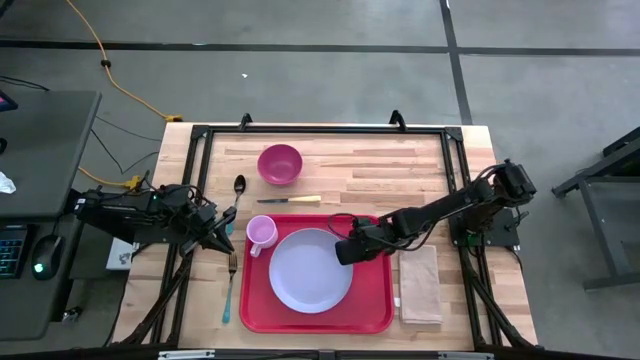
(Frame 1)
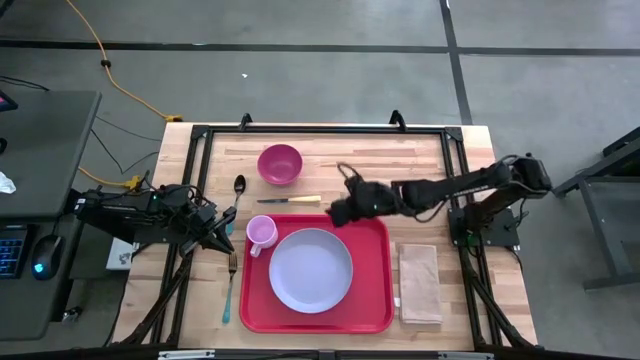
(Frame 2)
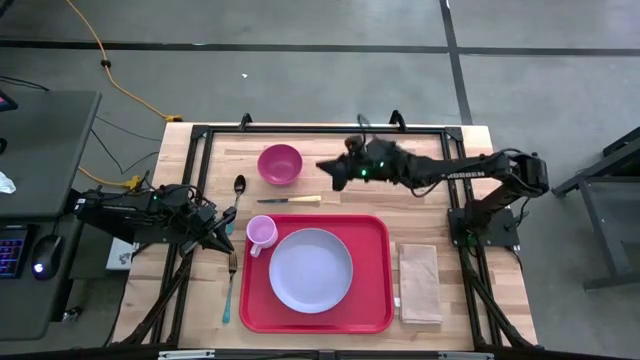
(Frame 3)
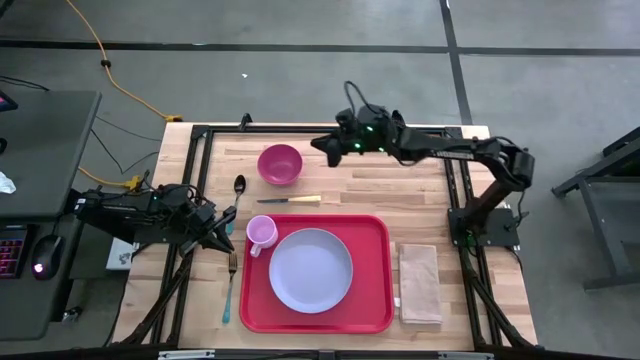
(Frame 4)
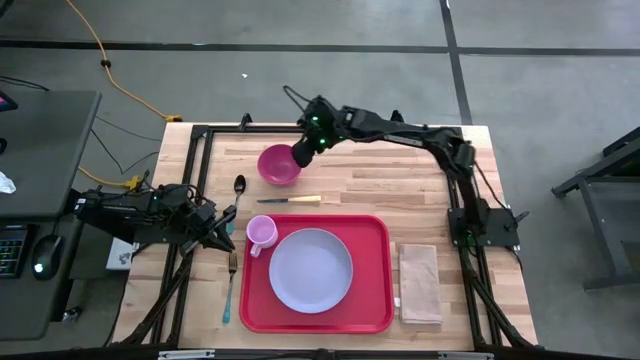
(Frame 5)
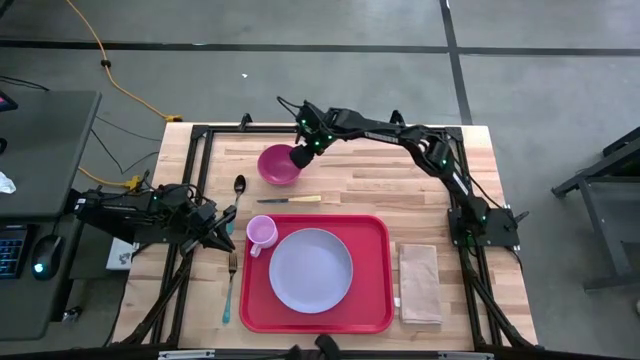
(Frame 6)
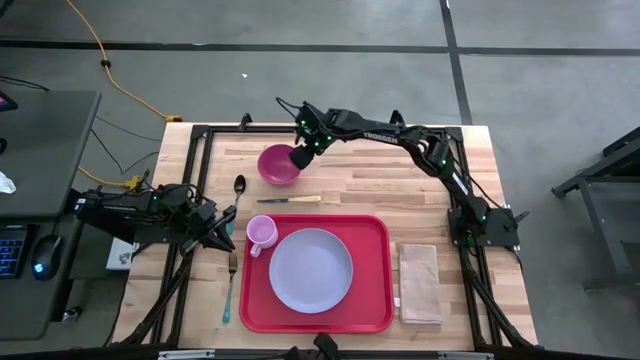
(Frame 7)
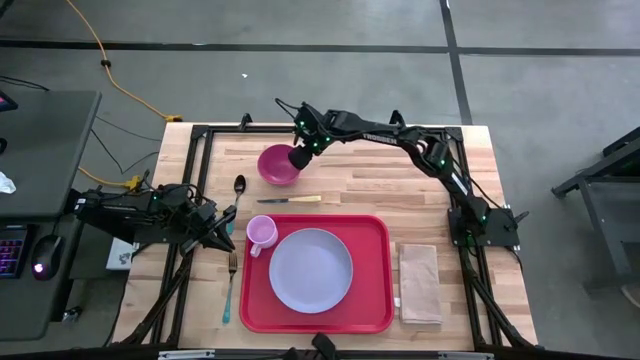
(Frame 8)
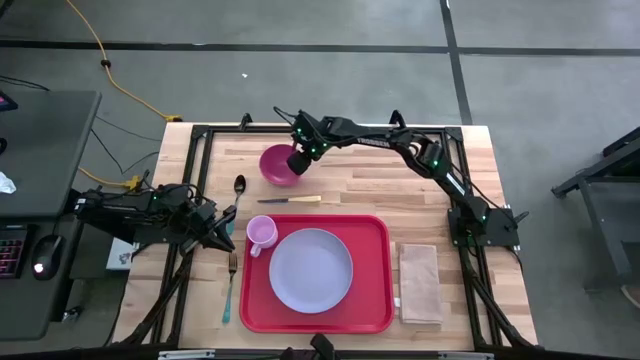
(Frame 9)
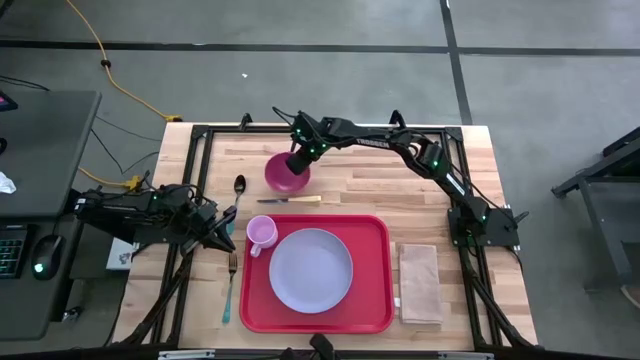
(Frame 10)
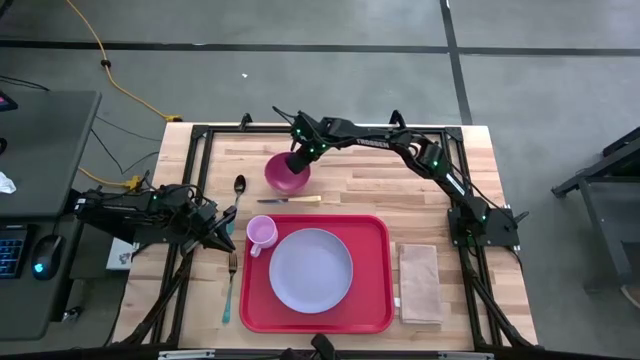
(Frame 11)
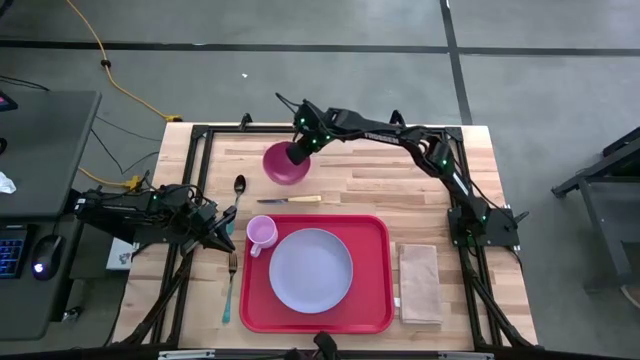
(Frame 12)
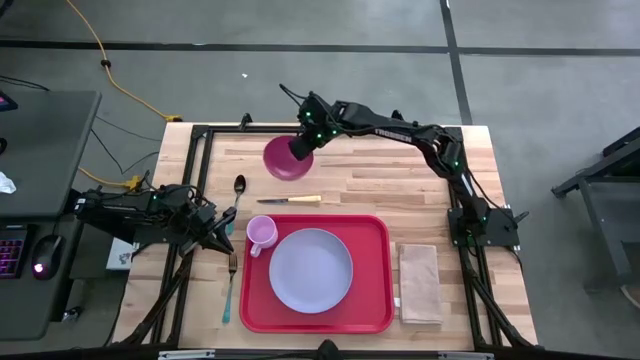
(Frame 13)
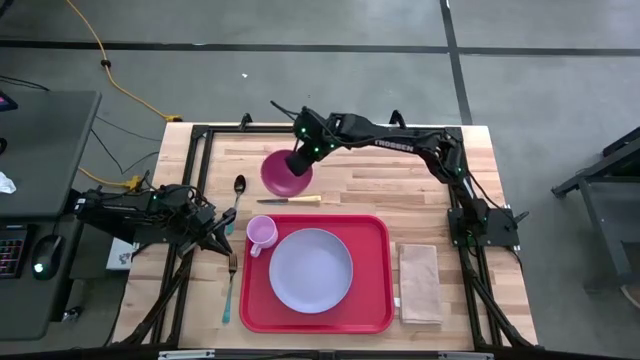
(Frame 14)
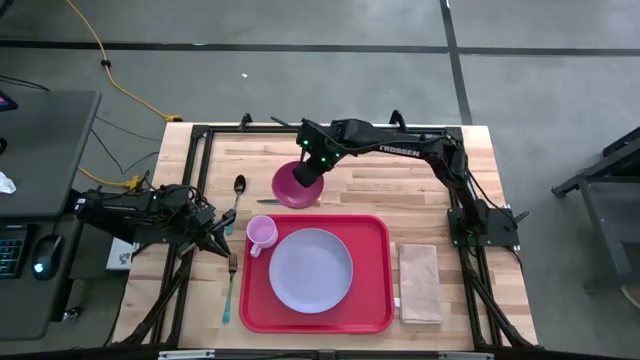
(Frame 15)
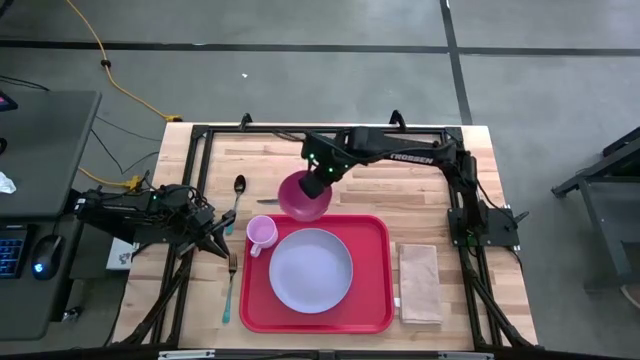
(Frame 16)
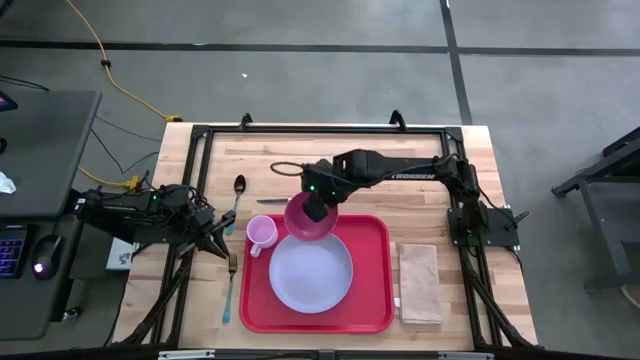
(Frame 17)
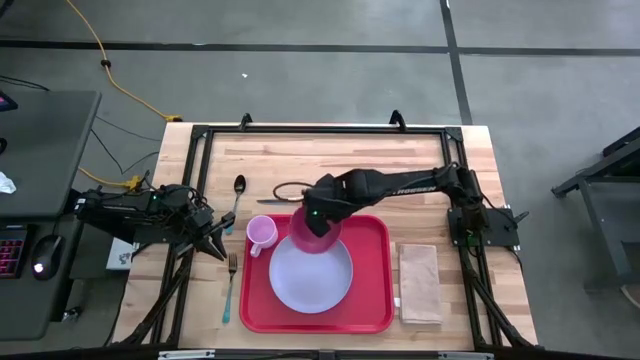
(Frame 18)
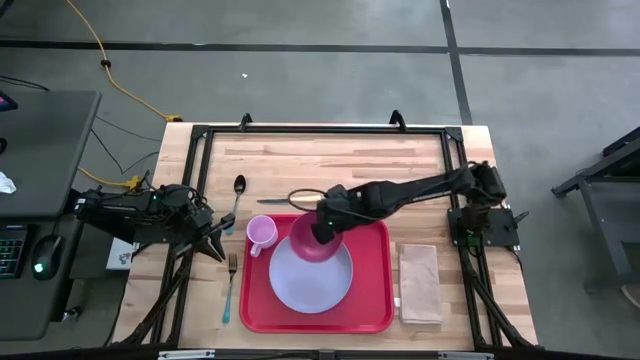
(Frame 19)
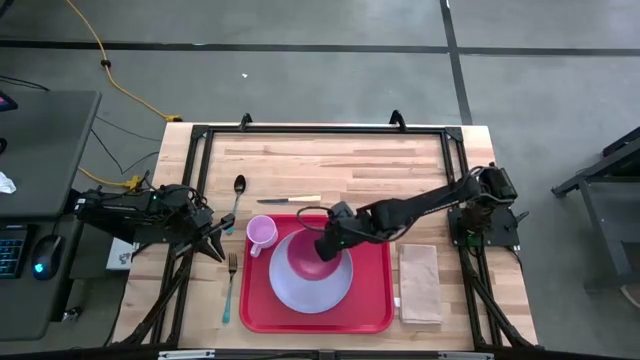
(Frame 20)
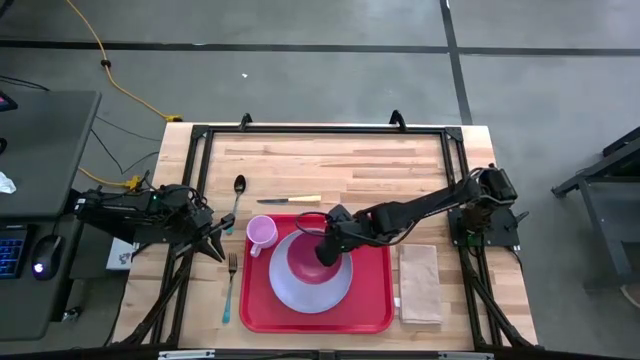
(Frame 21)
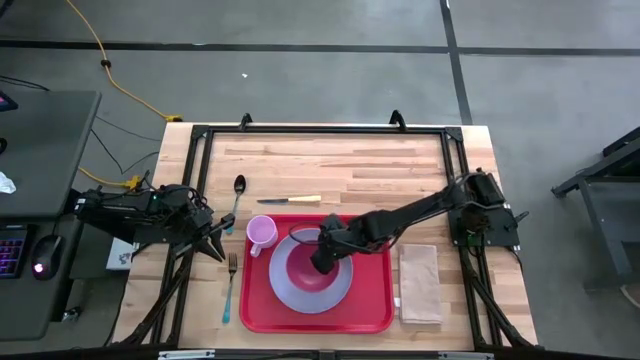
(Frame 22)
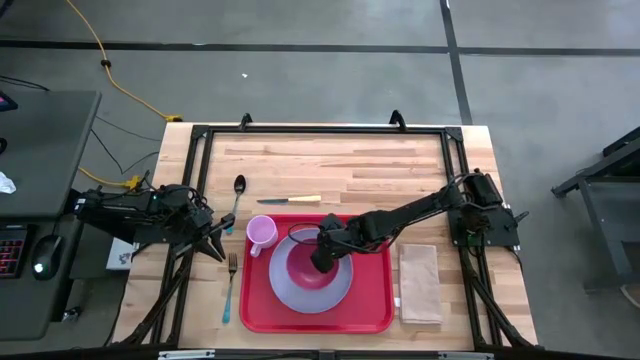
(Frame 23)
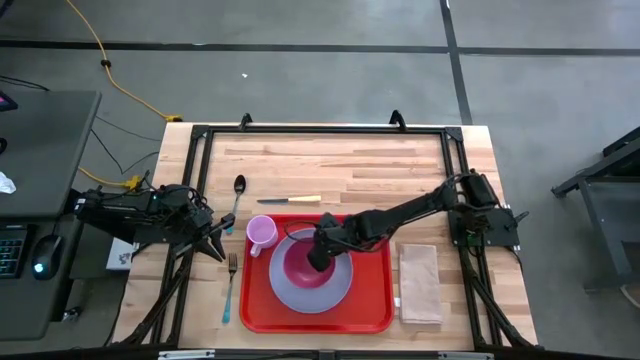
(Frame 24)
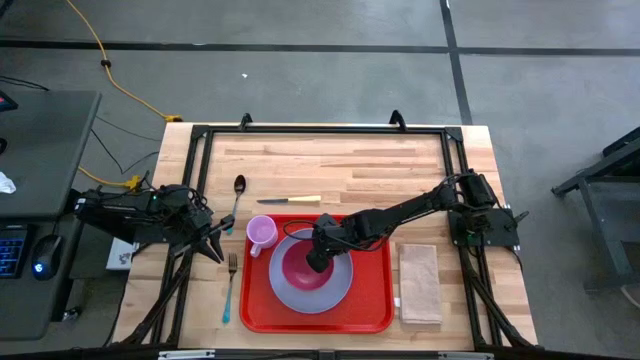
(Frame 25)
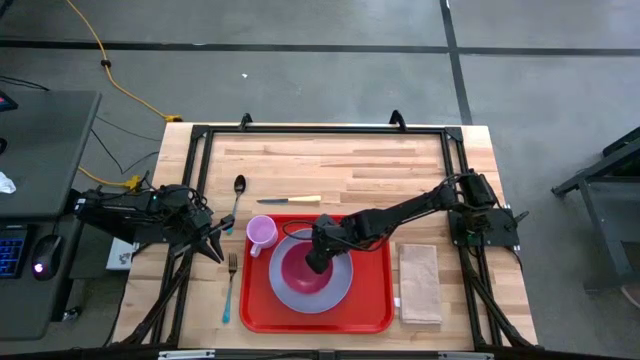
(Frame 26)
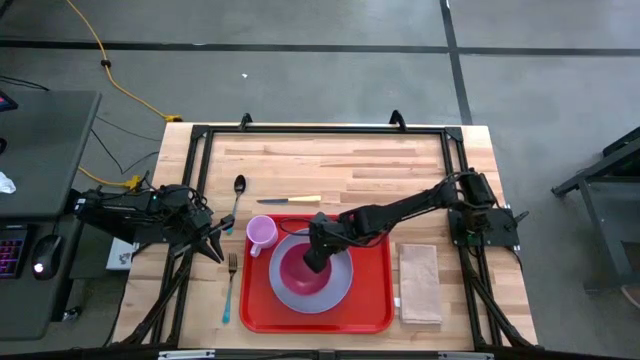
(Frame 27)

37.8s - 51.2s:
Task: Set up tray
Put the red bowl on top of the white plate on the red tray

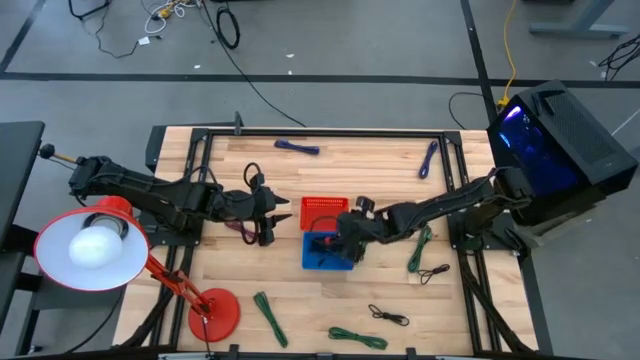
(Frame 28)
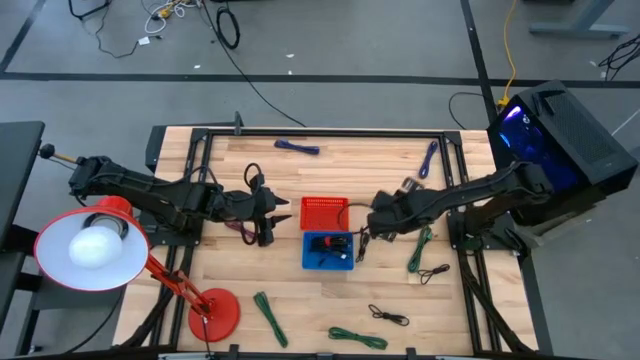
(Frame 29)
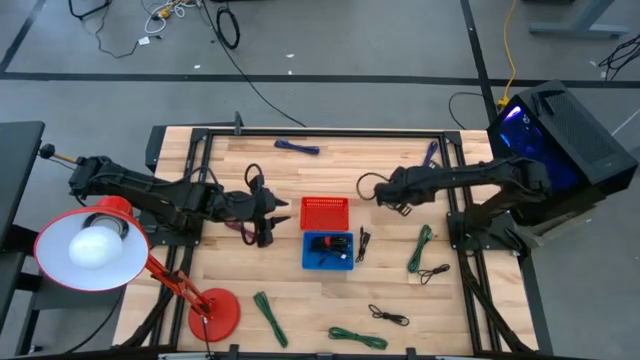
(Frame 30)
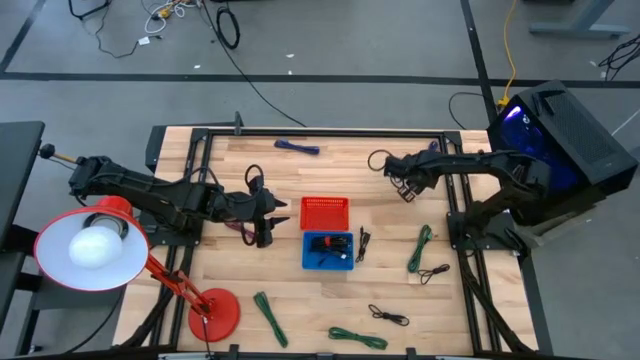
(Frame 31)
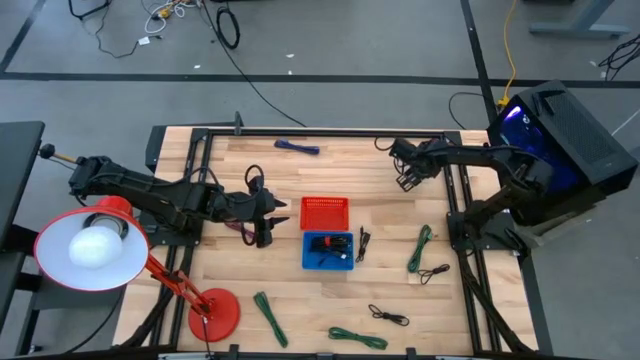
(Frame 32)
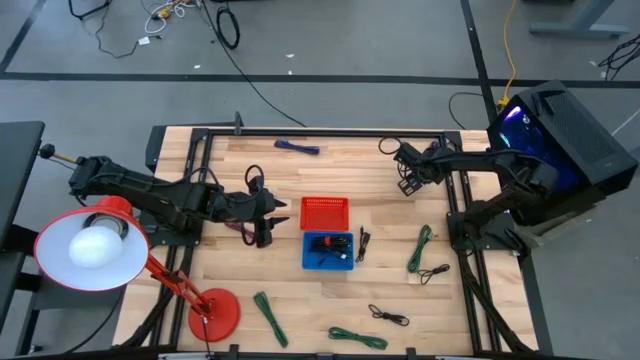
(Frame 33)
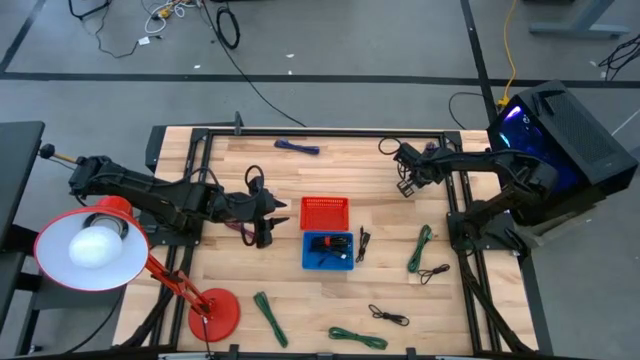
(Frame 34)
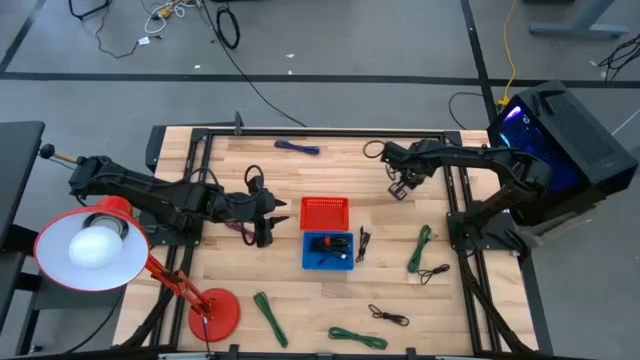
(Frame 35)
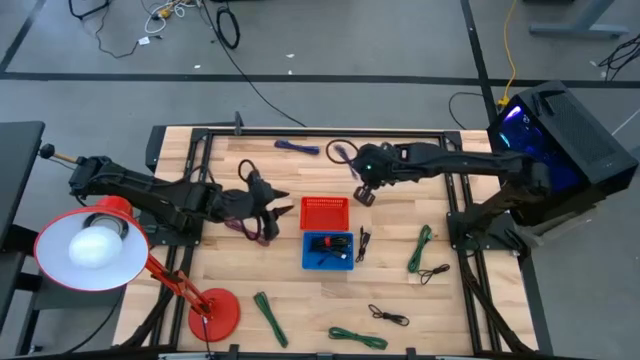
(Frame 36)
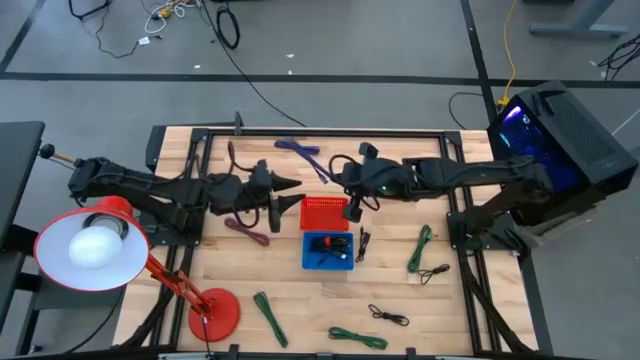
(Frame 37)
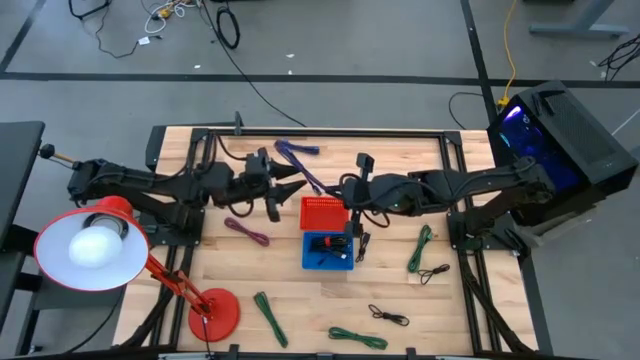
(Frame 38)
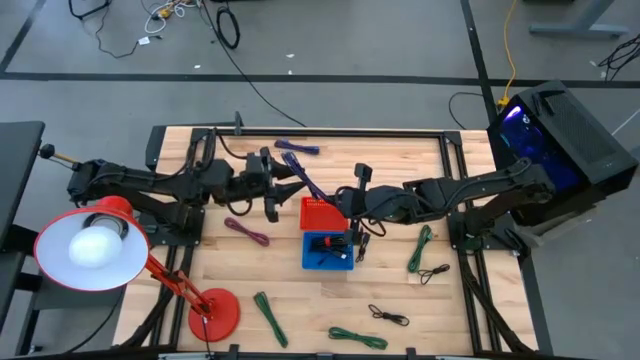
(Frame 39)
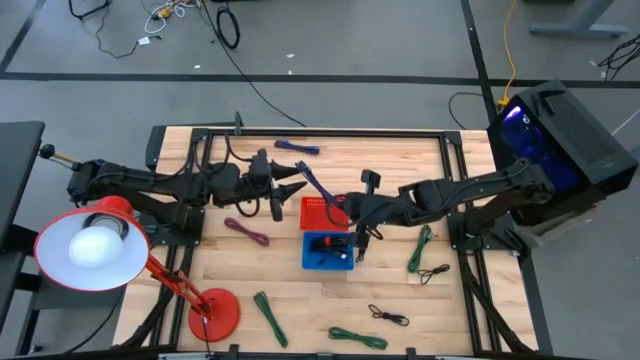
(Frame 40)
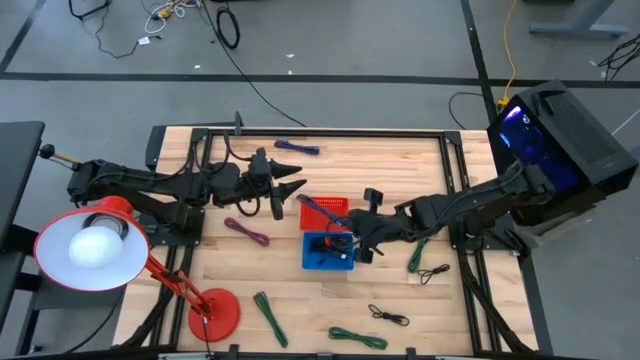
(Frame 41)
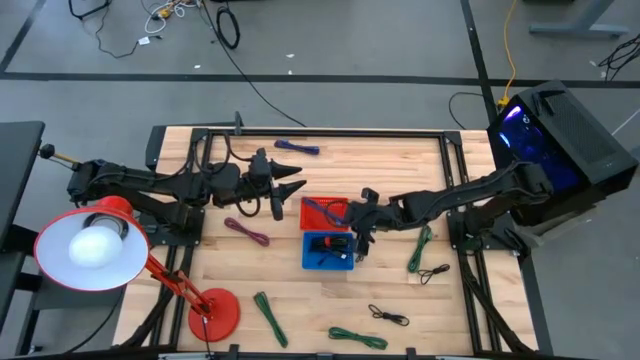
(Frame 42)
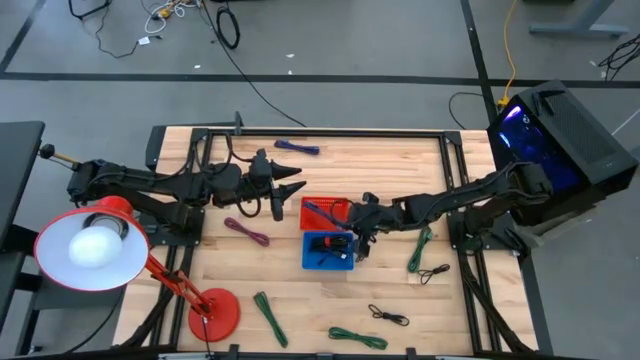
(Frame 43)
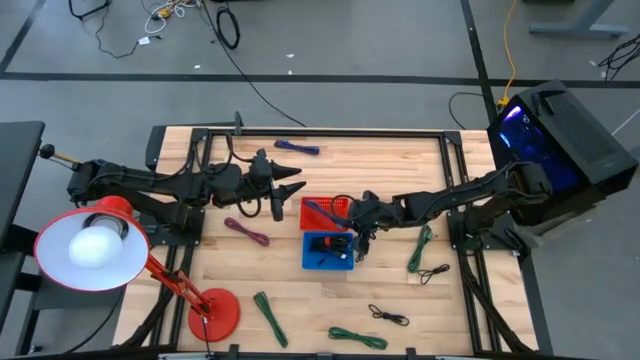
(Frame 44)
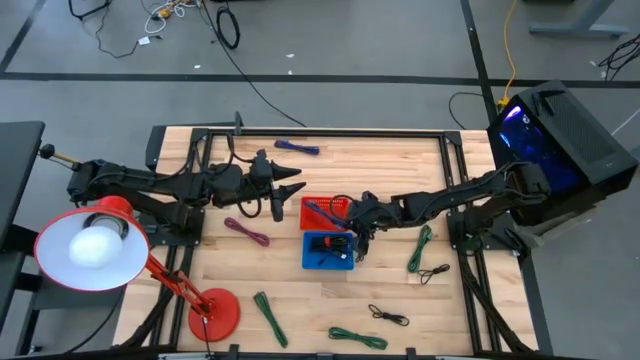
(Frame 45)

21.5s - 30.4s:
Task: Pick & Place USB Port
Put the blue charger cable into the red bin
